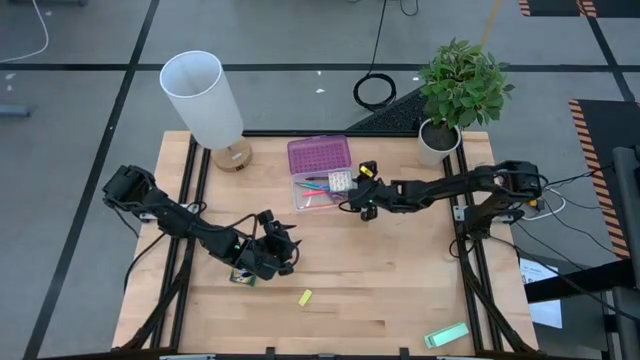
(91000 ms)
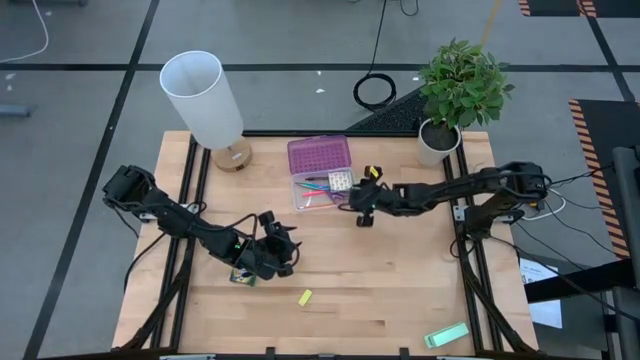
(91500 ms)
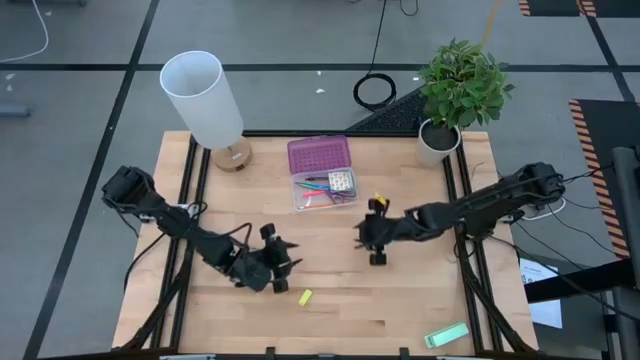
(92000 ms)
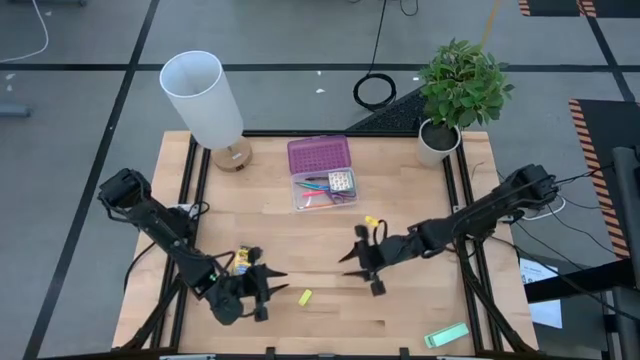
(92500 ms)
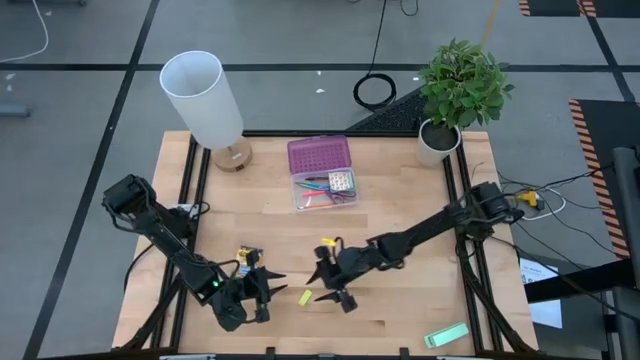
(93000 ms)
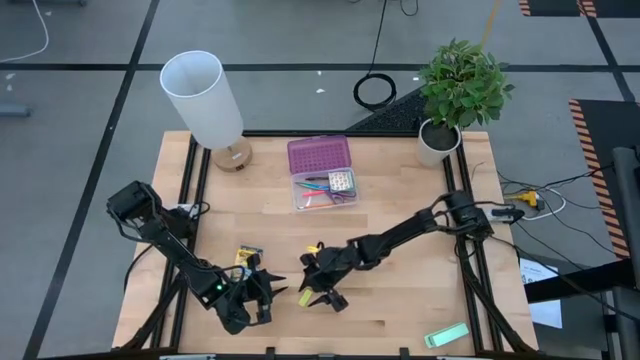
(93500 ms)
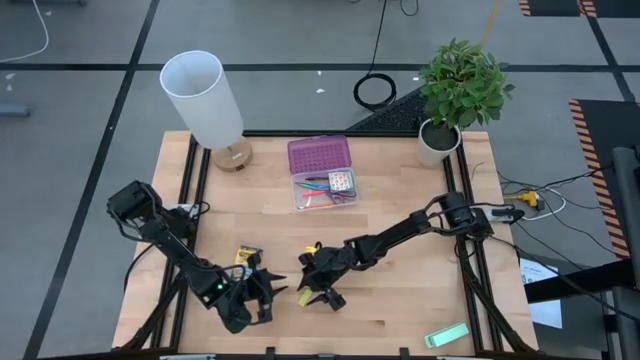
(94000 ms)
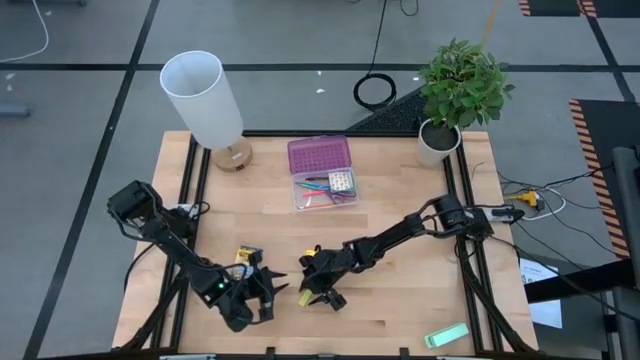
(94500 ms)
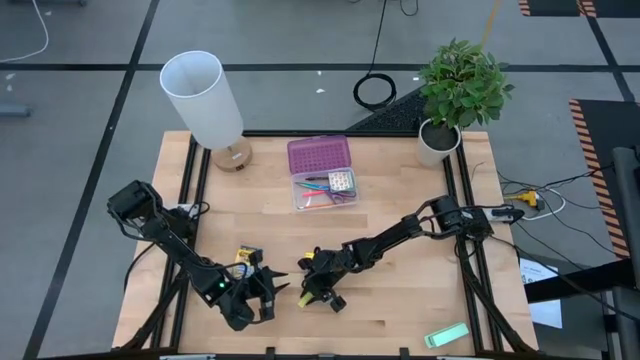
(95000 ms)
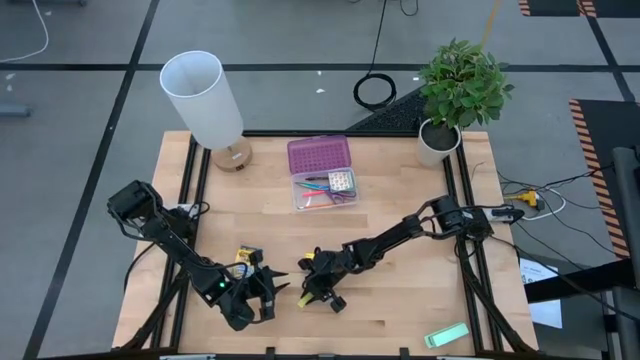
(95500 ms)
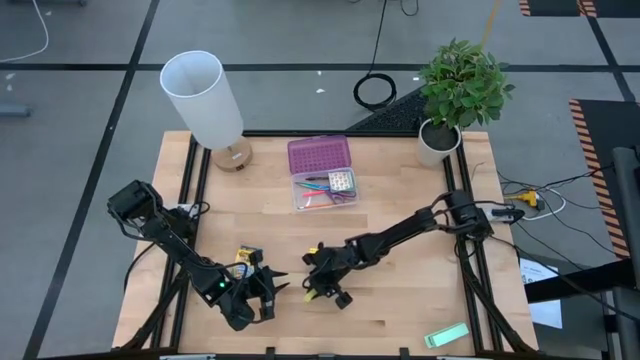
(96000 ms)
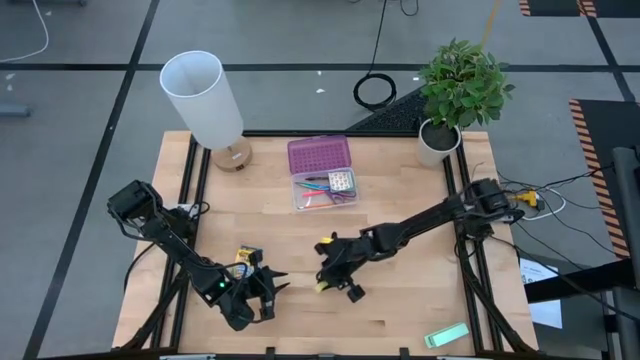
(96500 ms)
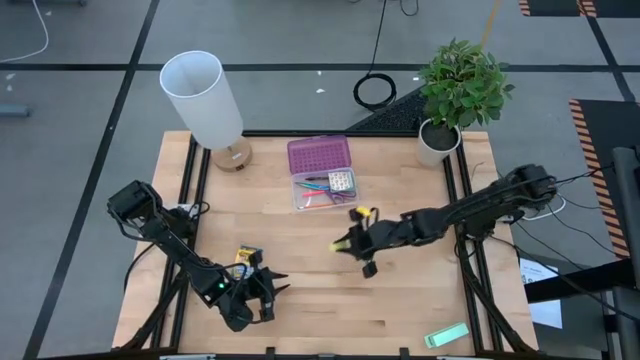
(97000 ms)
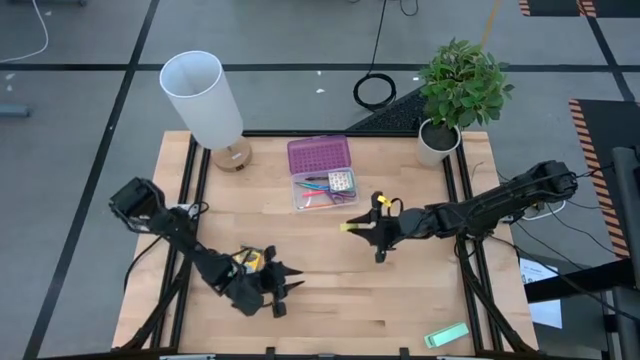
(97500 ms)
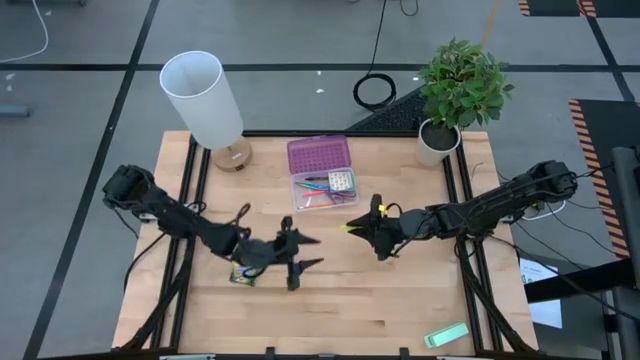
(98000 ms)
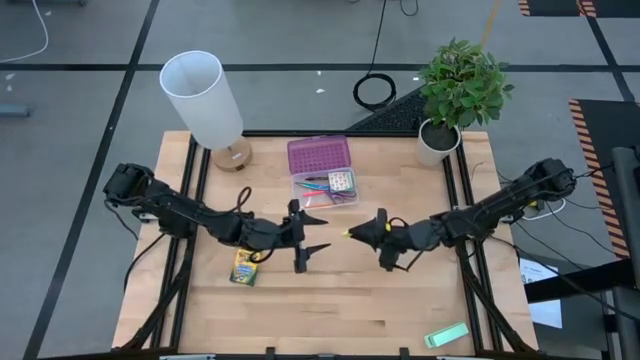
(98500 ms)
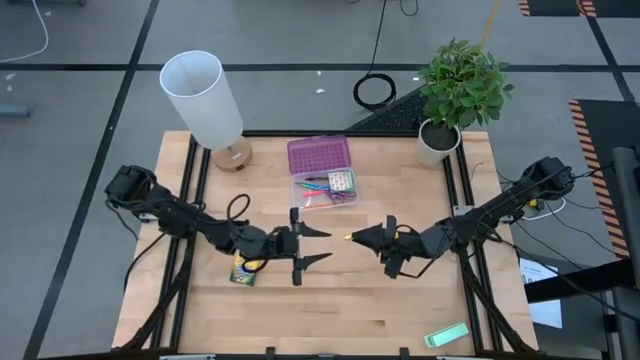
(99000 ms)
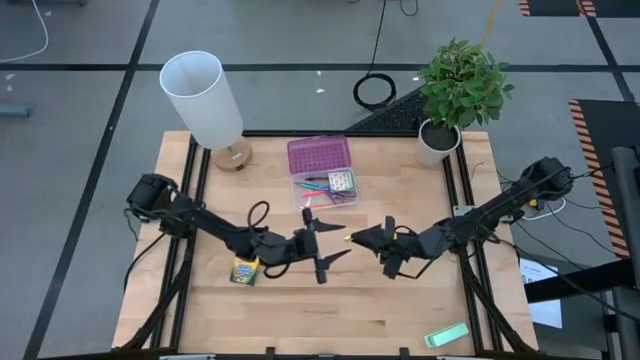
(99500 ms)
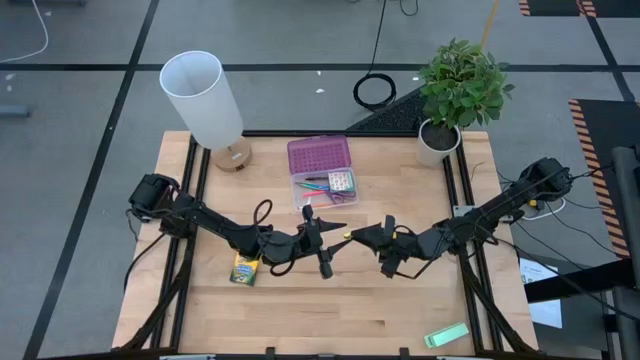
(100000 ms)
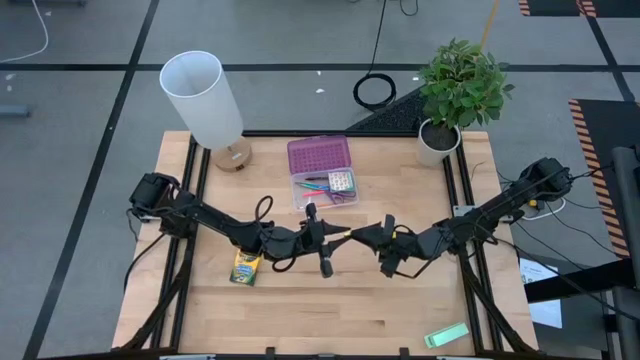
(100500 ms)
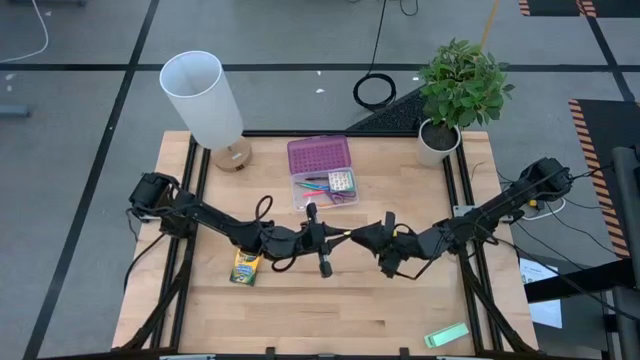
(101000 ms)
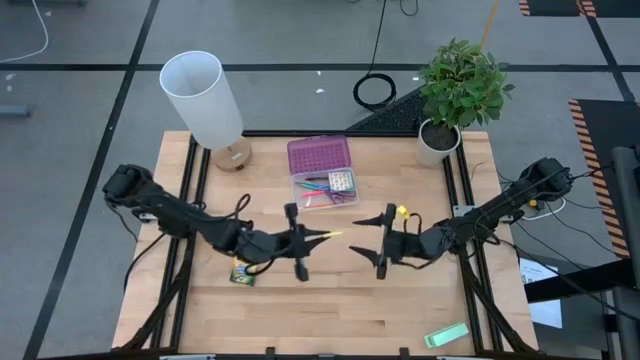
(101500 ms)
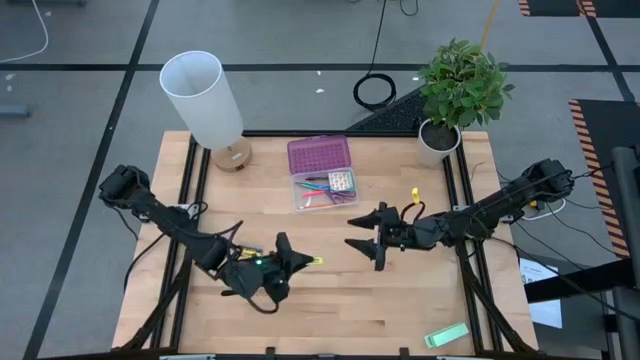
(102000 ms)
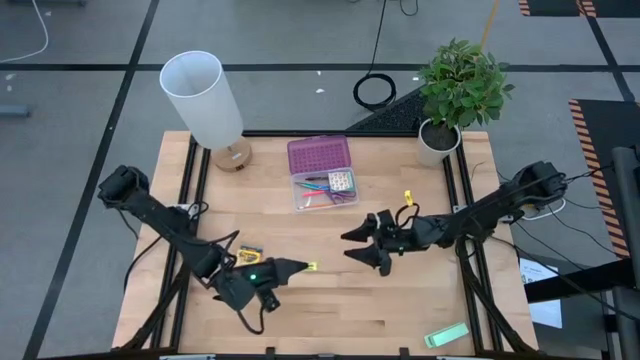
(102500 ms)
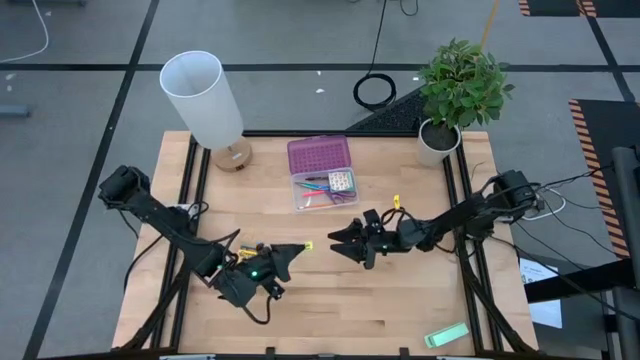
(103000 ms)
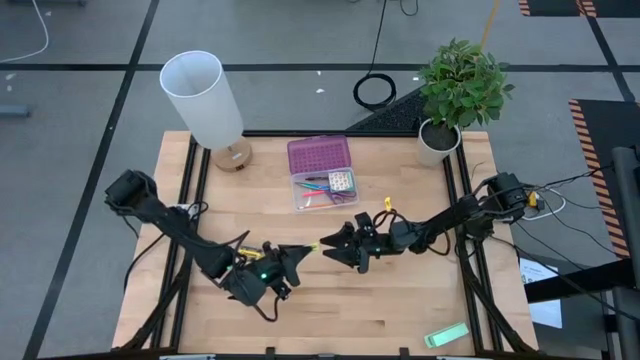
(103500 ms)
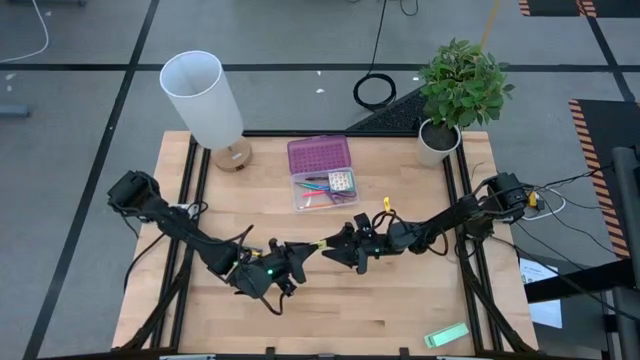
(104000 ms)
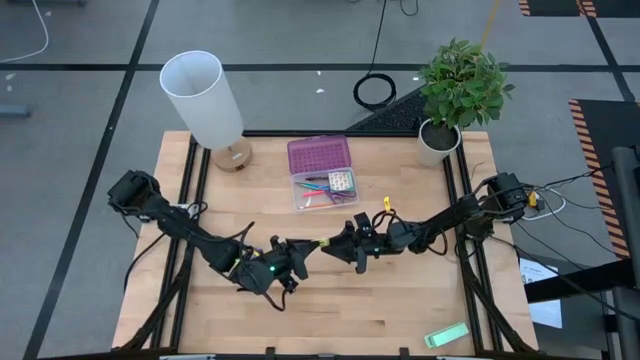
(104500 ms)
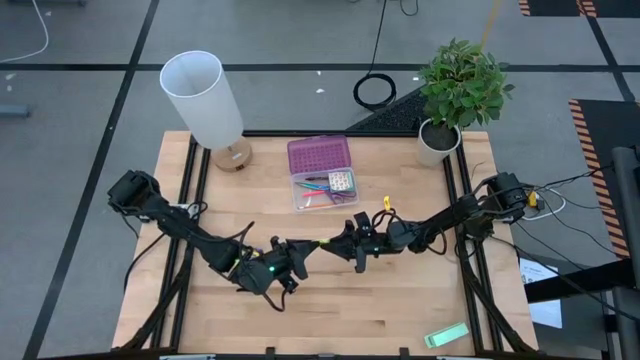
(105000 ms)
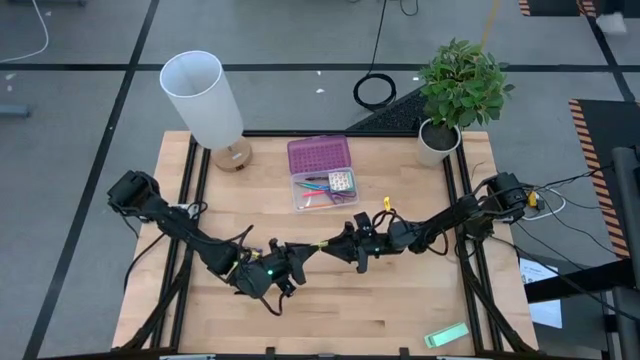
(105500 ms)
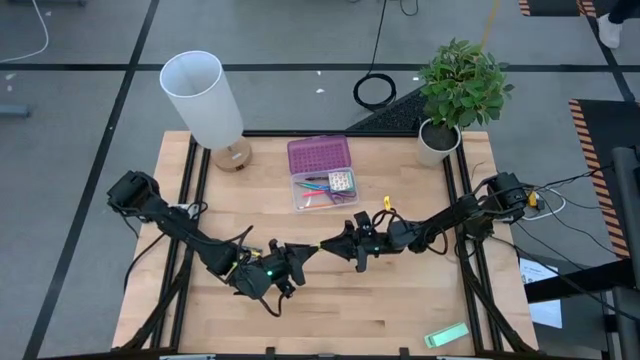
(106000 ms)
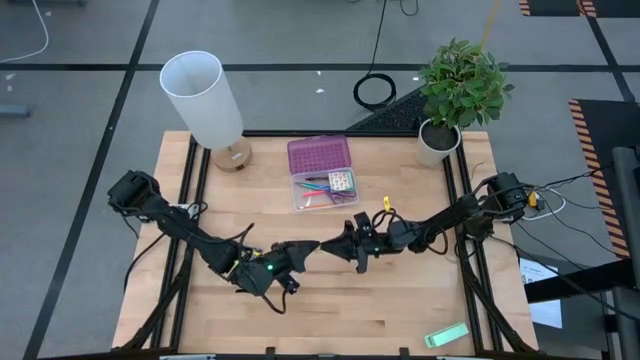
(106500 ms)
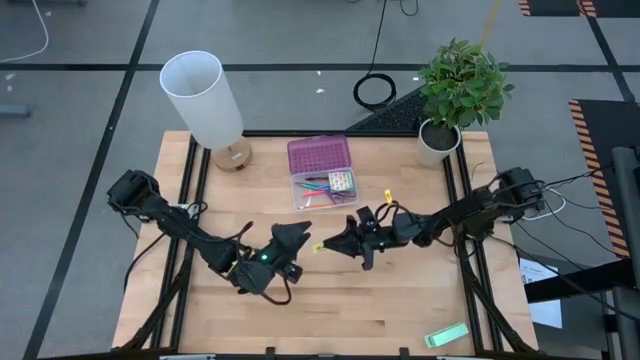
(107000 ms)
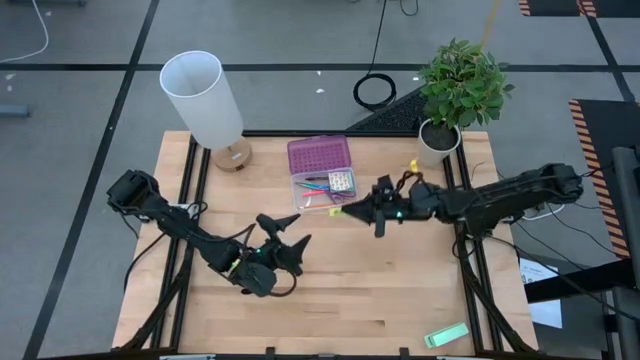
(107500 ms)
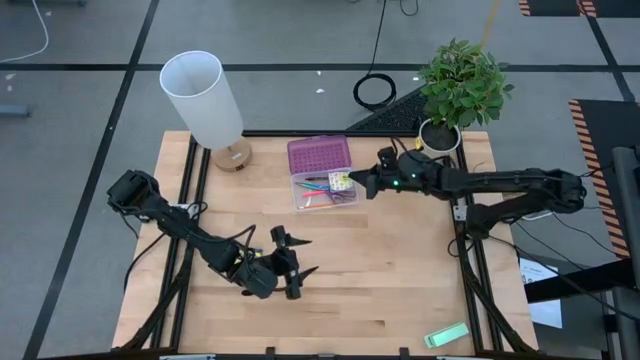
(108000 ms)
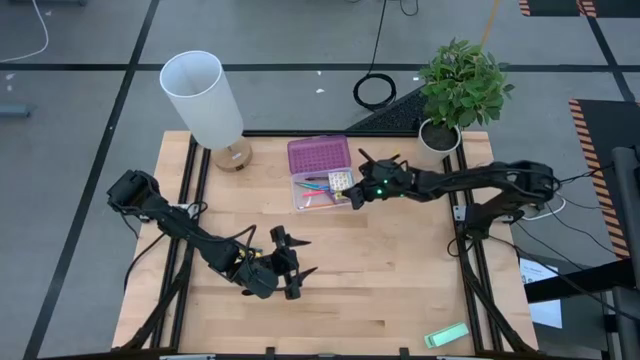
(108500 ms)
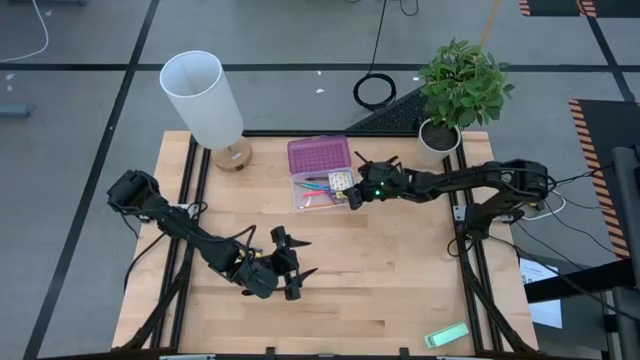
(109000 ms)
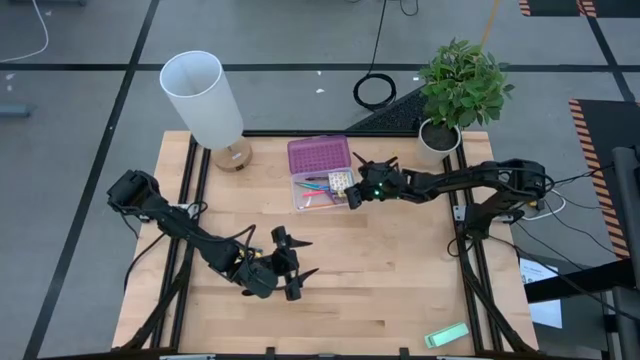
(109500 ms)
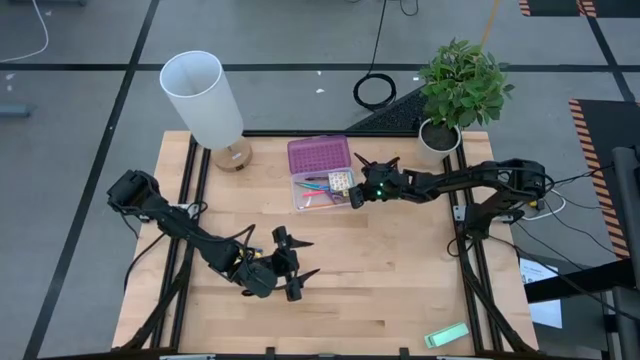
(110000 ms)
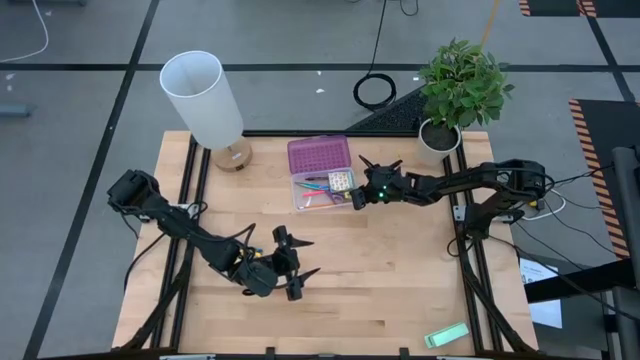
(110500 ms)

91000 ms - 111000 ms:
Task: Pack school essentials
Put the yellow eraser into the purple supply box

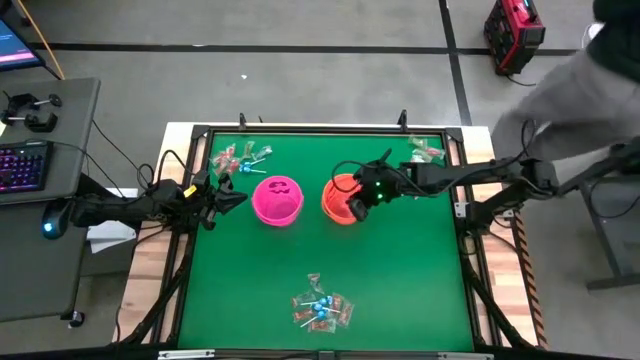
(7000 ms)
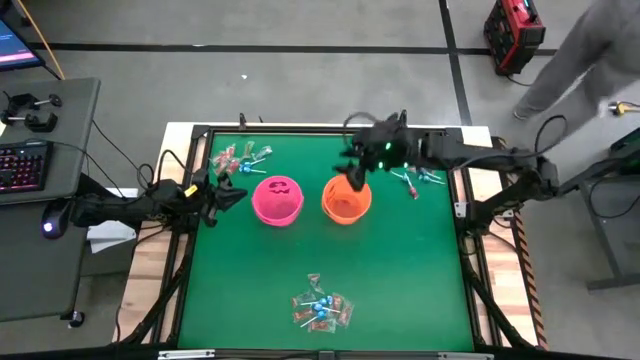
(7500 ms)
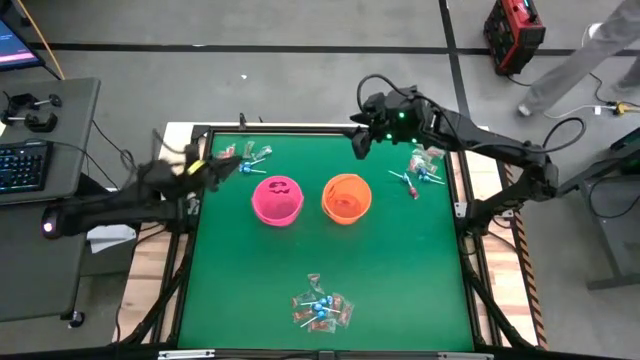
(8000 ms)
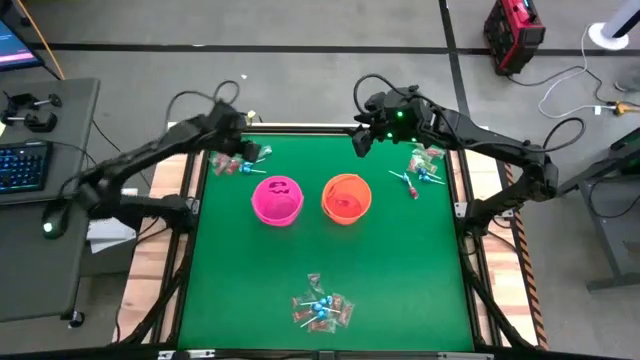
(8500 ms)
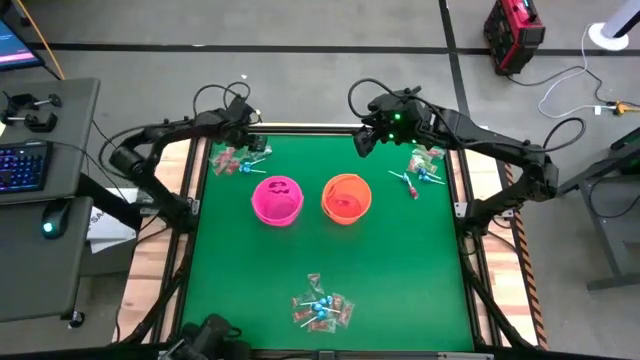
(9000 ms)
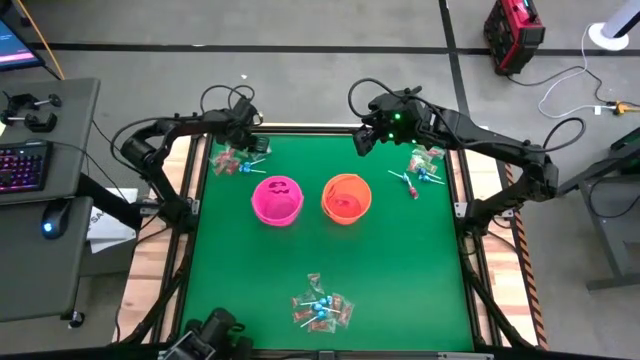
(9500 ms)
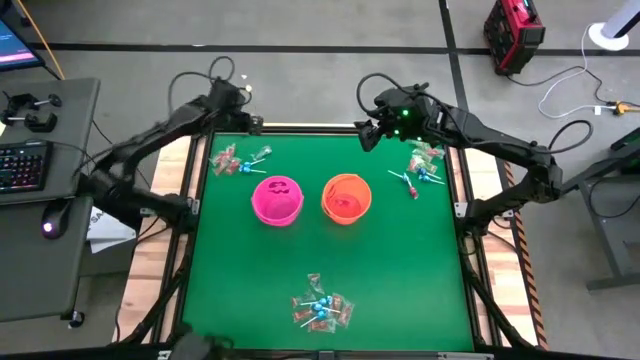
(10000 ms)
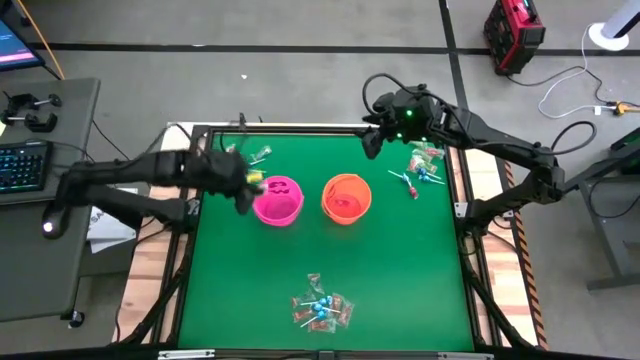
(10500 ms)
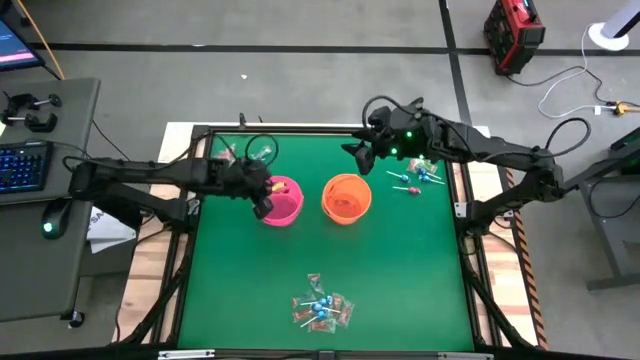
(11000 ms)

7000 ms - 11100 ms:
Task: Sort candy by brand, put in halloween buckets
Put the green gummy into the orange bucket
